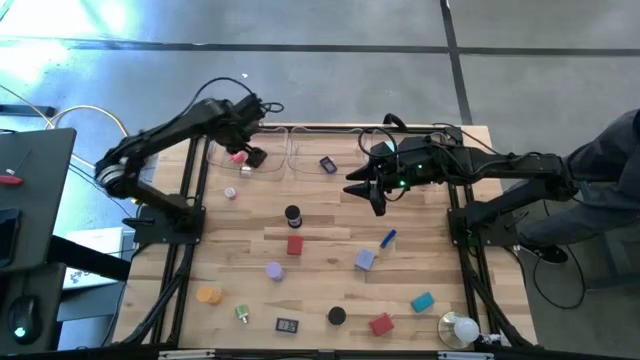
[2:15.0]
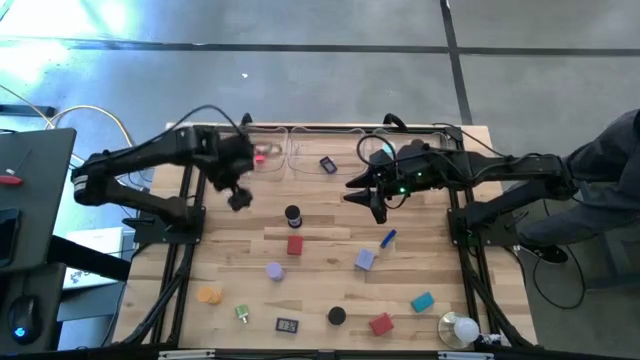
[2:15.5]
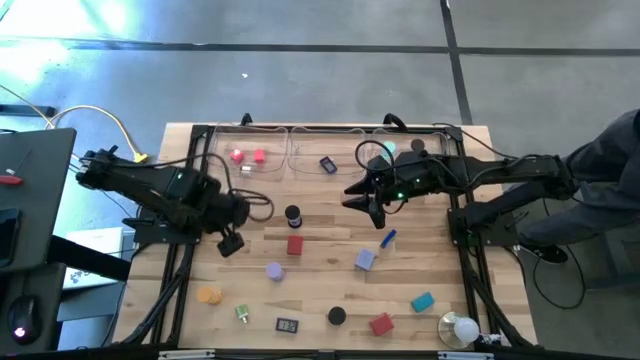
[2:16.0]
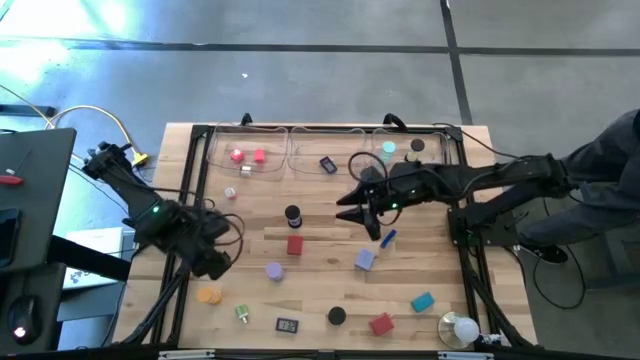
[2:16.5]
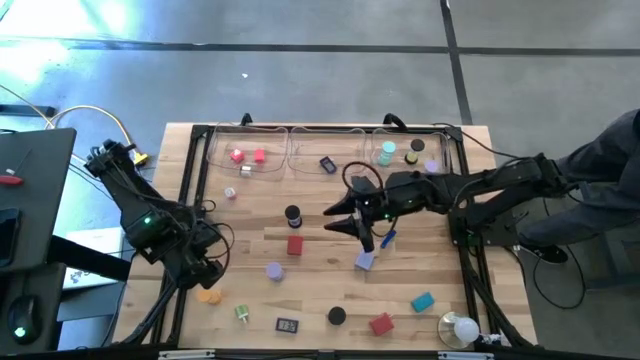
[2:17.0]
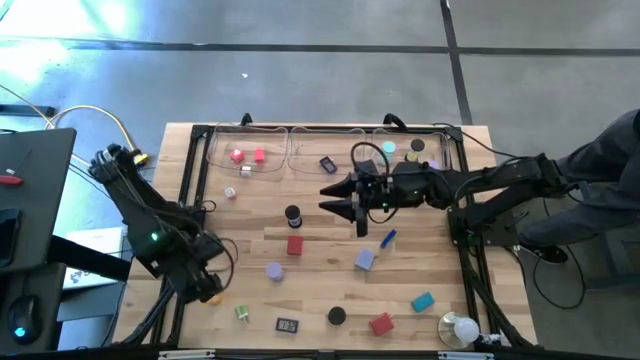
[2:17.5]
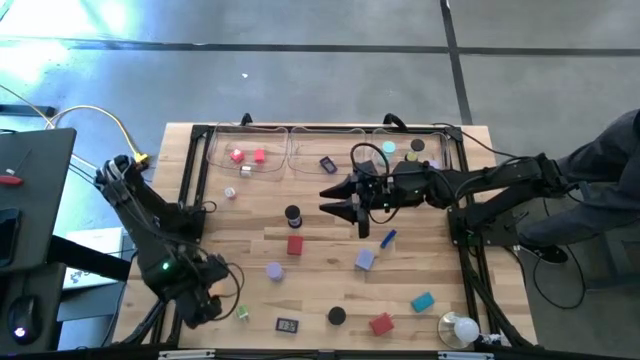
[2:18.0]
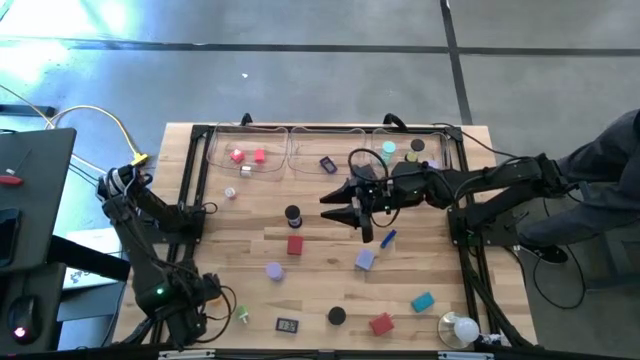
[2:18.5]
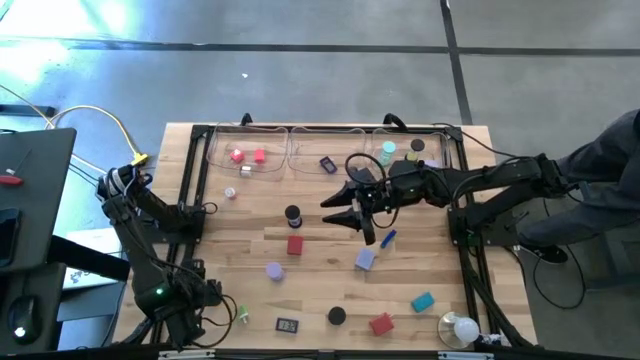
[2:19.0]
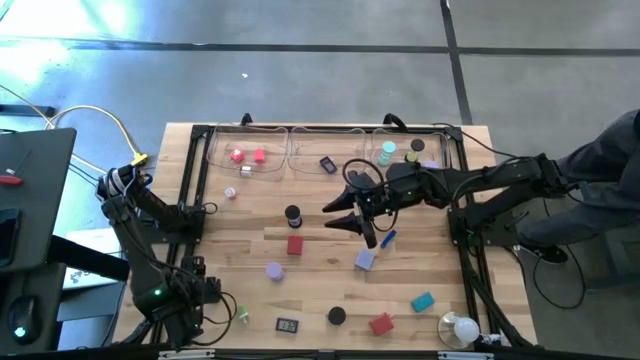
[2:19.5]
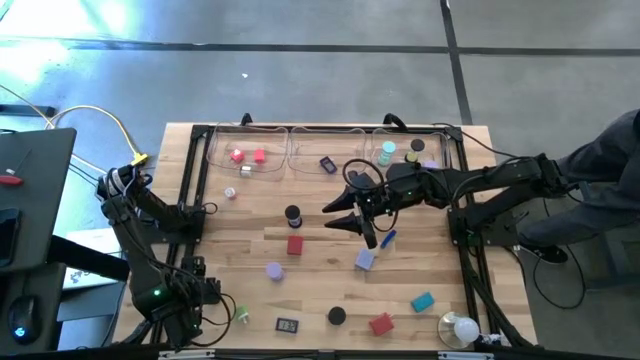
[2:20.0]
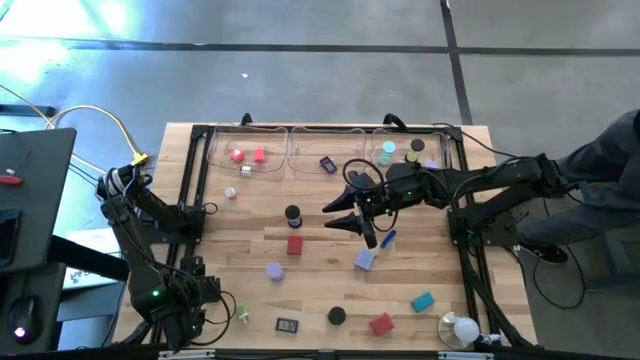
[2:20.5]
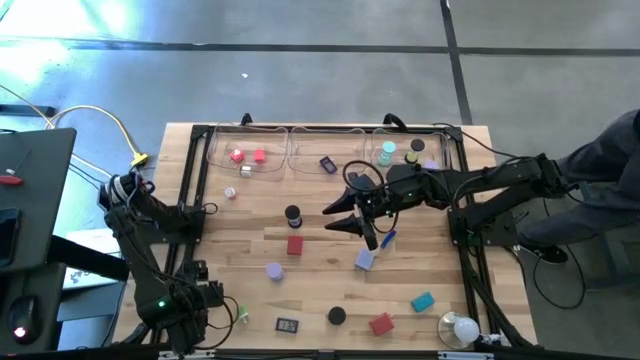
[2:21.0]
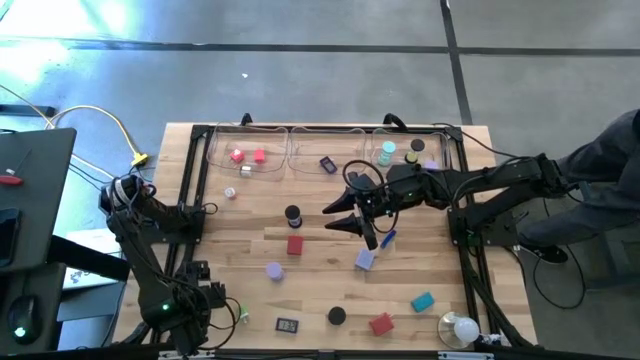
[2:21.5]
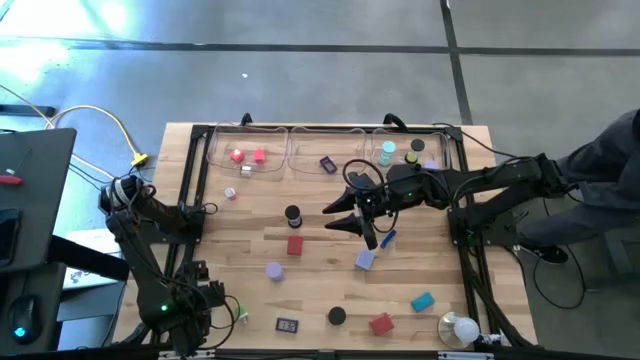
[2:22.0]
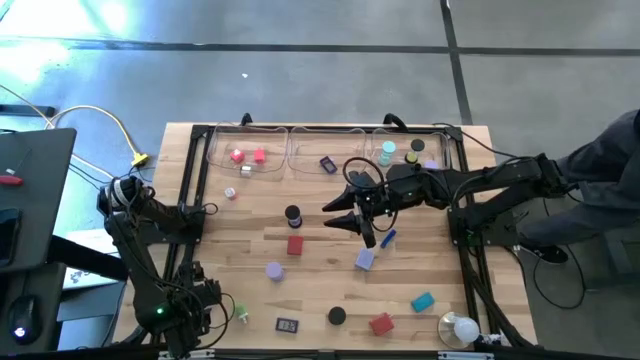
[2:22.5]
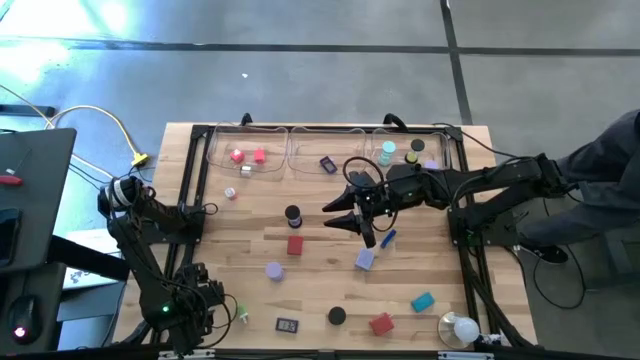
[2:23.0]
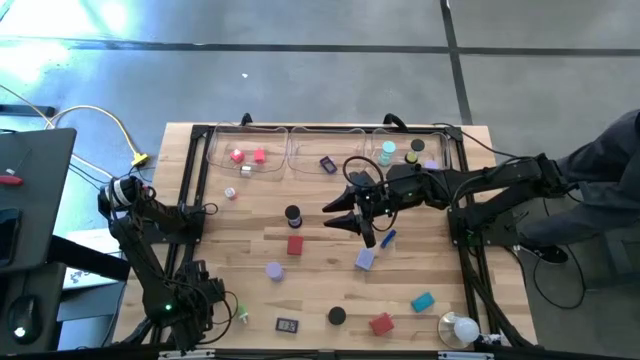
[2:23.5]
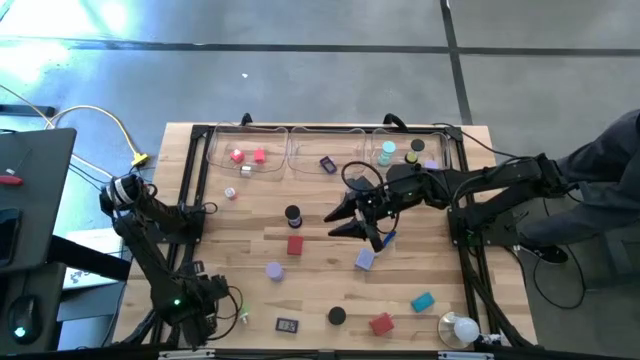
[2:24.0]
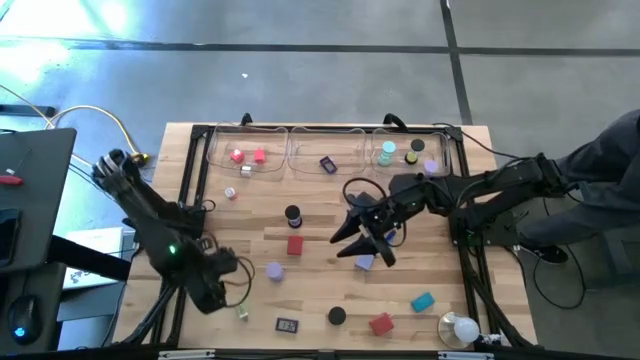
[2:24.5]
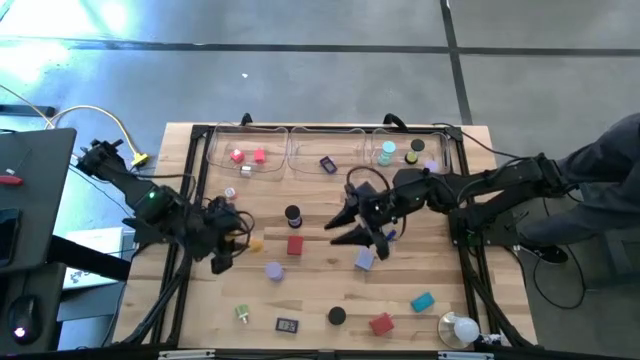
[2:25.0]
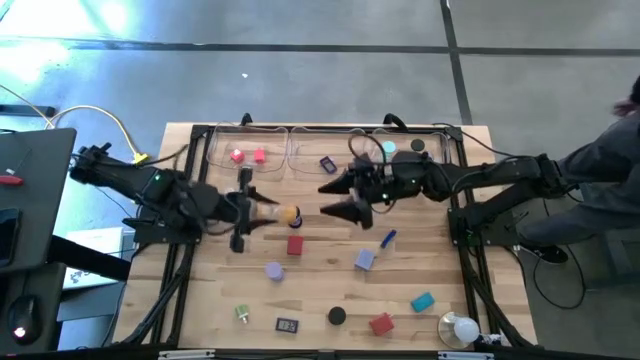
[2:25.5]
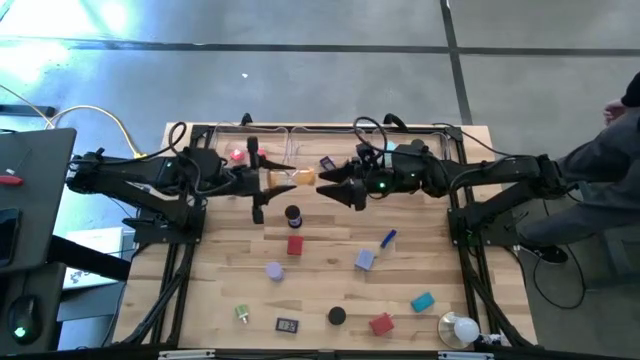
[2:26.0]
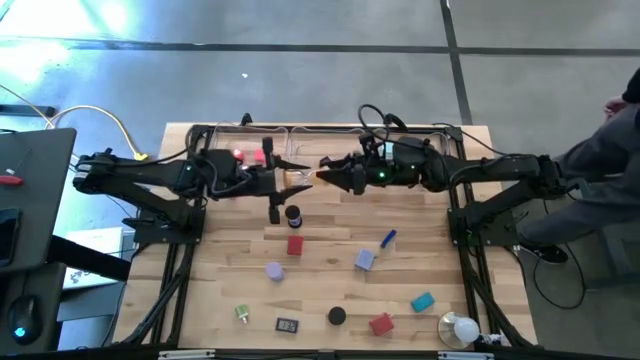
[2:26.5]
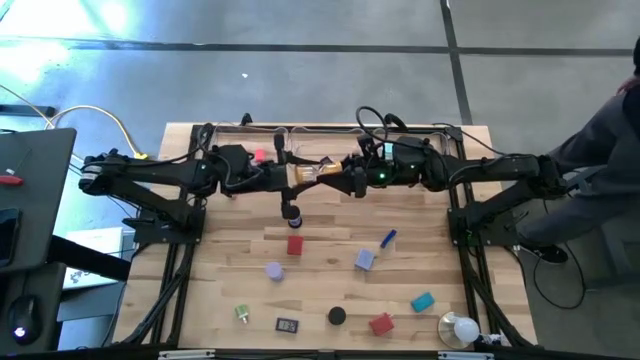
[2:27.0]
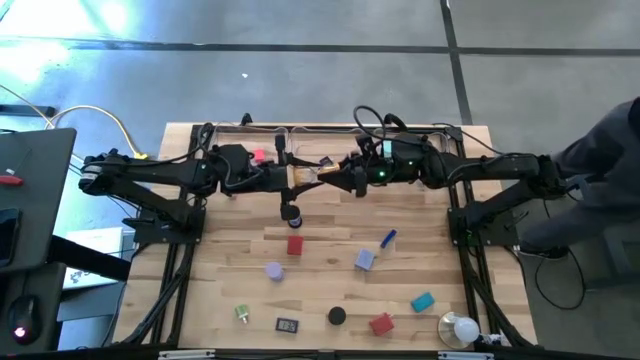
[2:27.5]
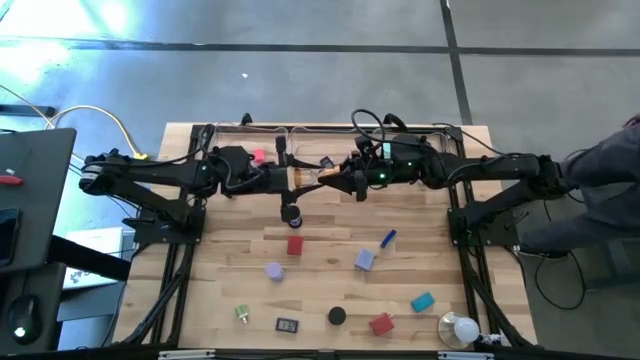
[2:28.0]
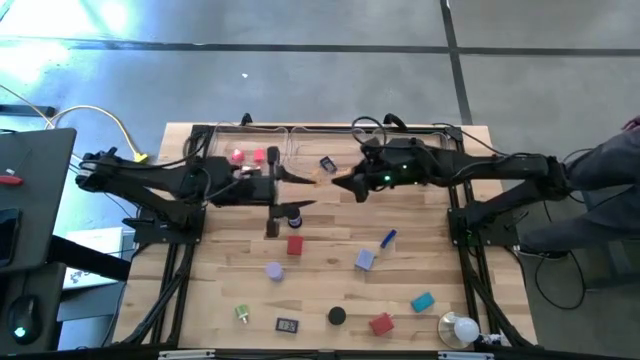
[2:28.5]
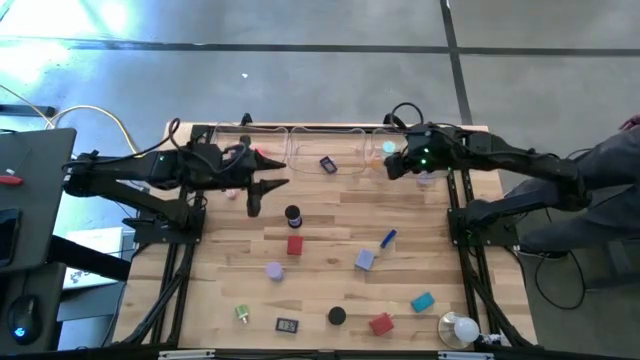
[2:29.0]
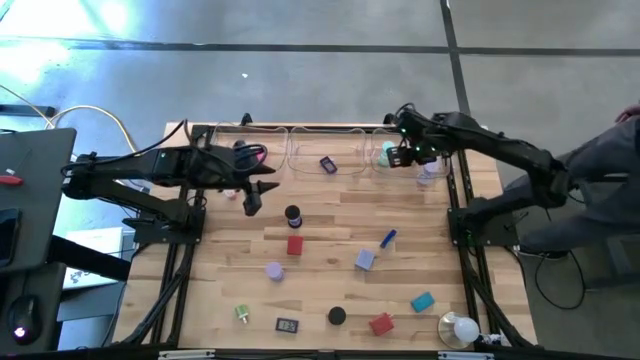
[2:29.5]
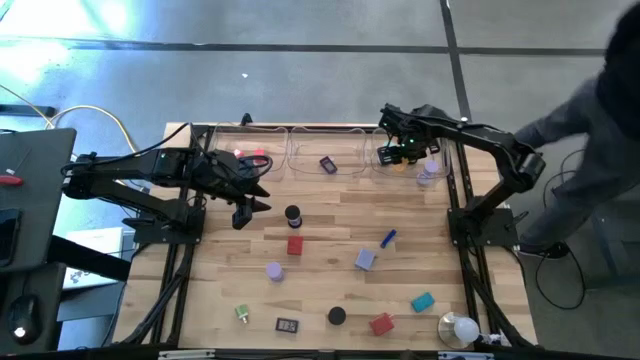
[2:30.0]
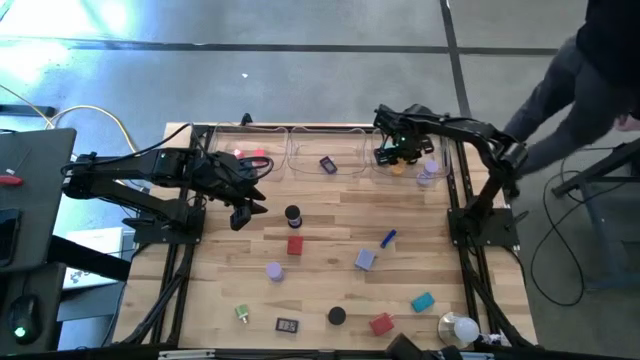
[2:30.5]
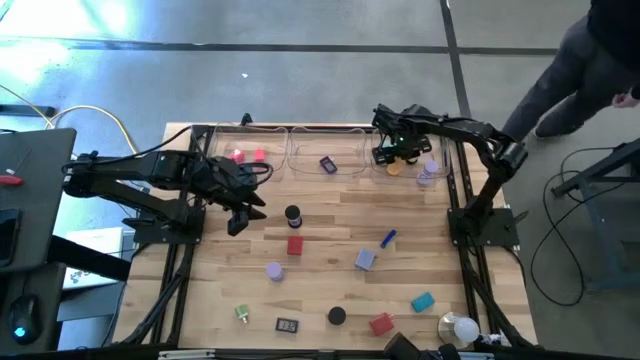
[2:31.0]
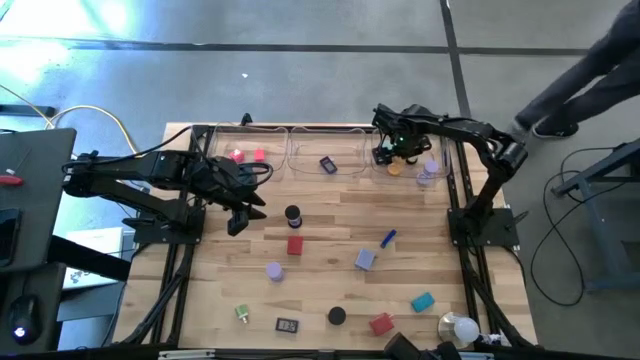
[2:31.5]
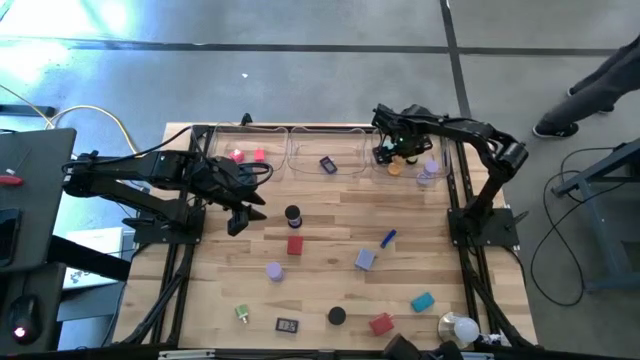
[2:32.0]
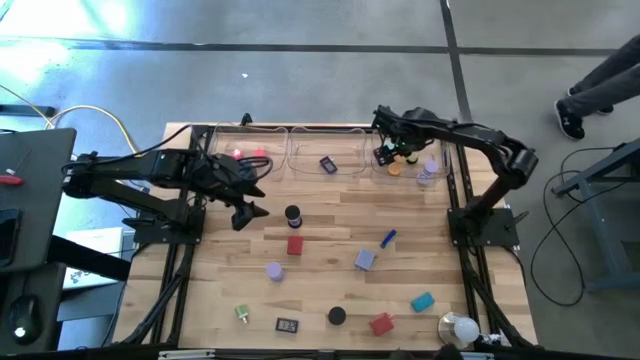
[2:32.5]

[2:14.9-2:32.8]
Task: Pick & Place Office items
Put the yellow hourglass into the right transparent bin

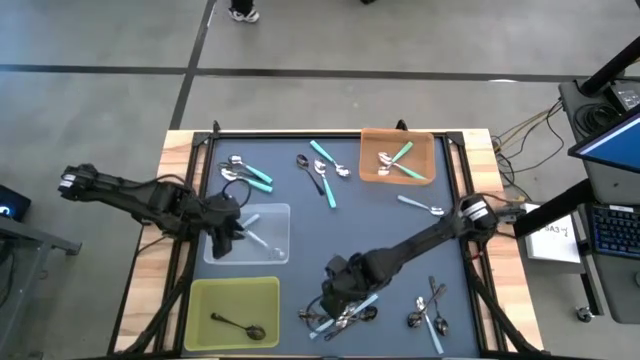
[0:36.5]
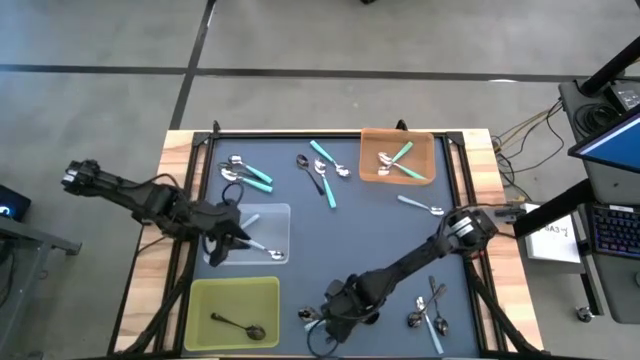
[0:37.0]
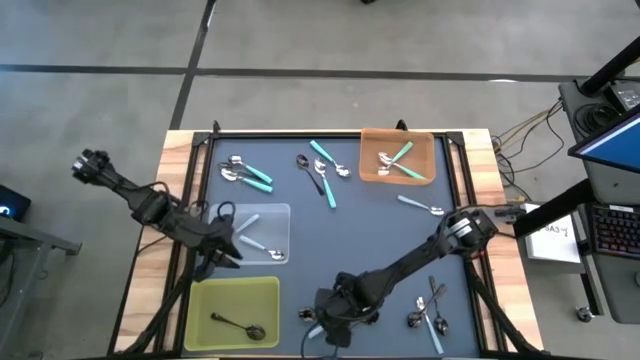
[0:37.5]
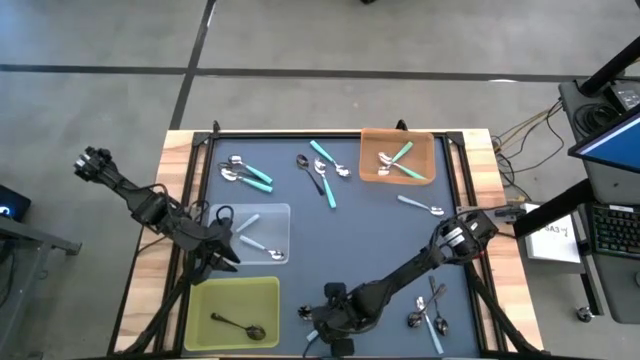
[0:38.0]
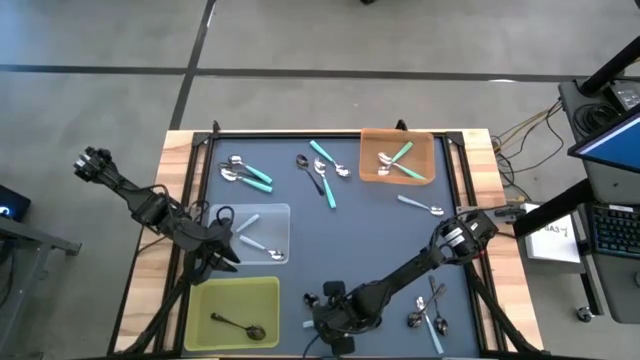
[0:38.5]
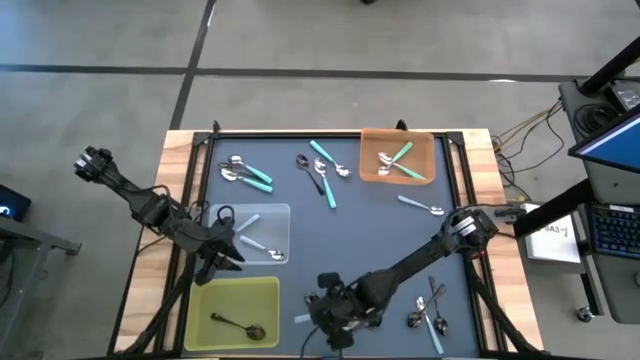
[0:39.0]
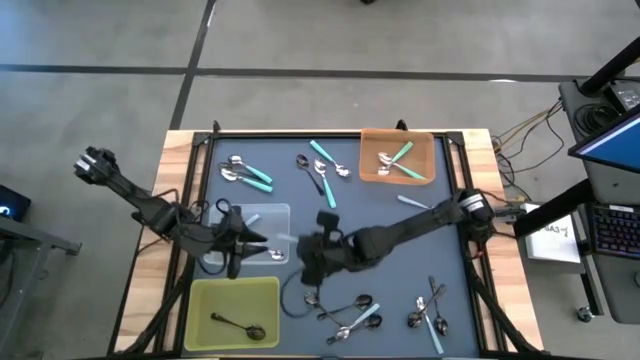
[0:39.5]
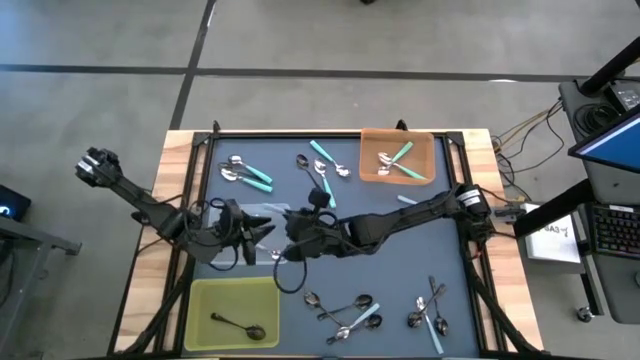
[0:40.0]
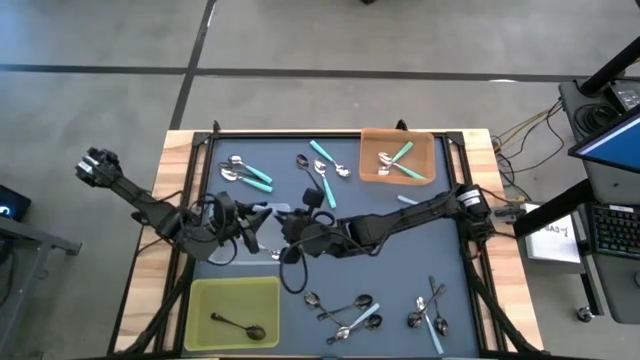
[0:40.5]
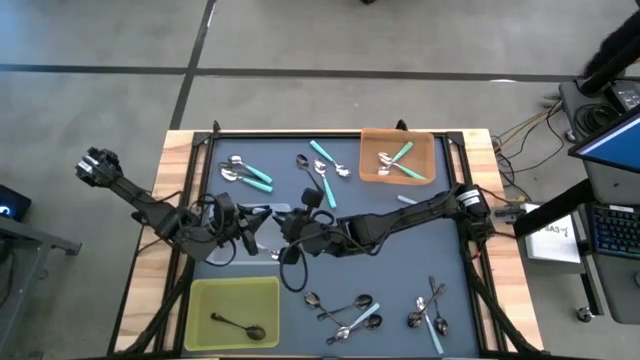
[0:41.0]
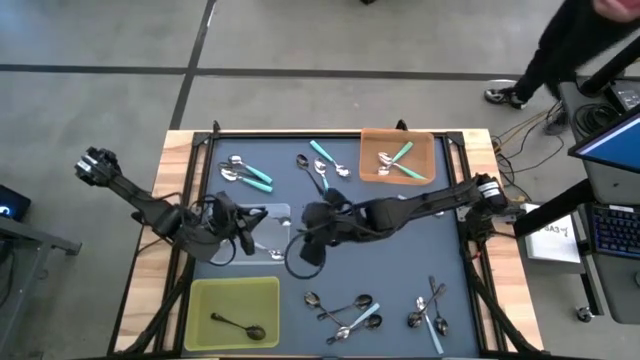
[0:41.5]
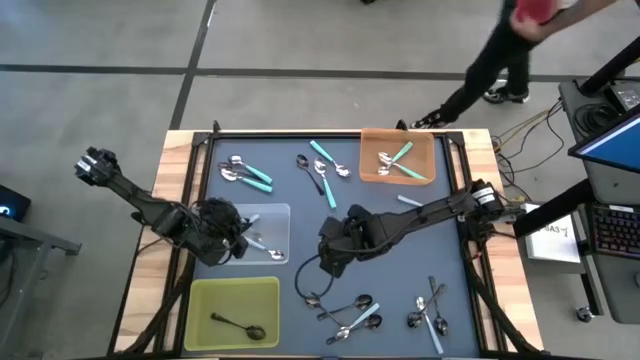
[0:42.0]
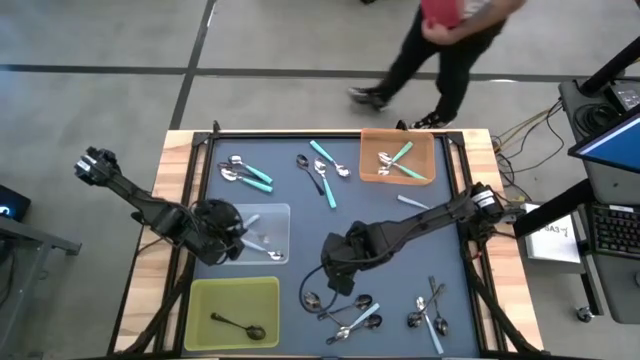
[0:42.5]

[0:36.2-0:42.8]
Task: Sort silverware by color (type)
Put the light blue spoon into the white bin
